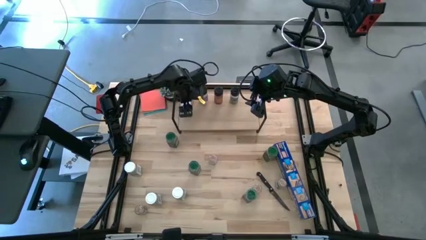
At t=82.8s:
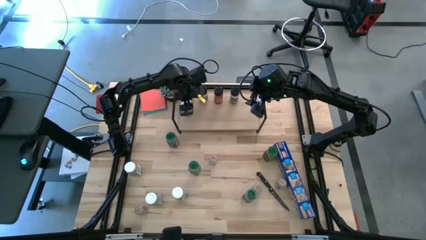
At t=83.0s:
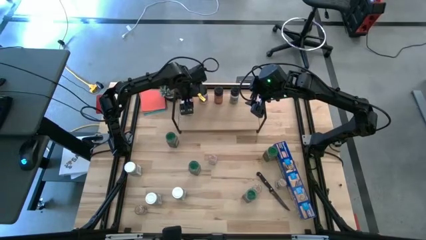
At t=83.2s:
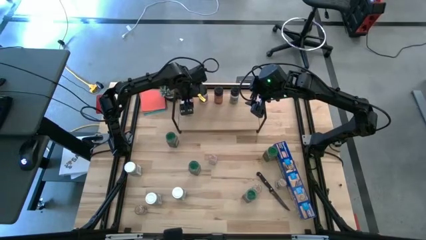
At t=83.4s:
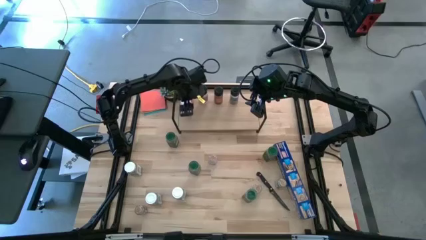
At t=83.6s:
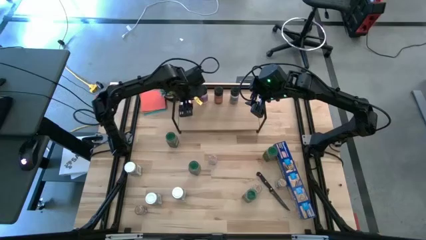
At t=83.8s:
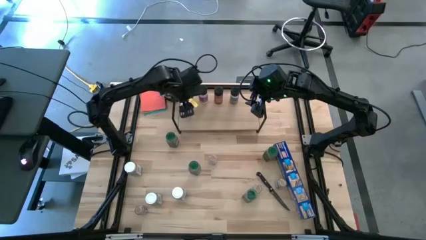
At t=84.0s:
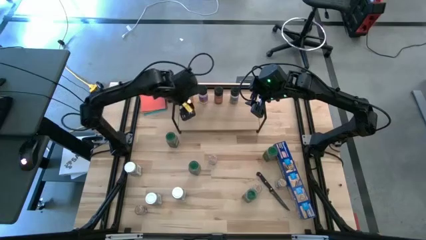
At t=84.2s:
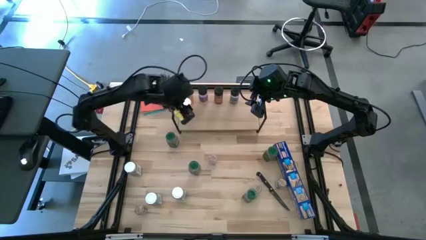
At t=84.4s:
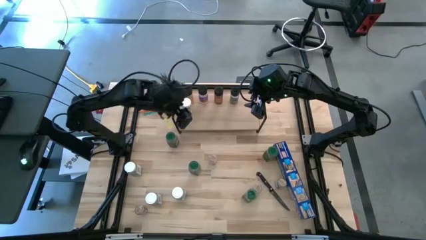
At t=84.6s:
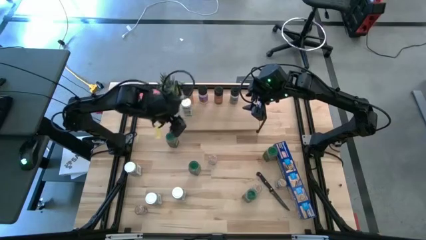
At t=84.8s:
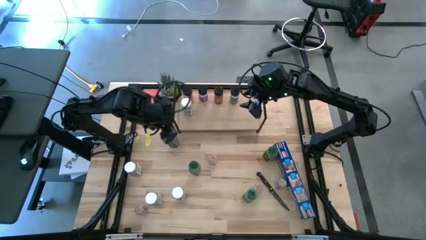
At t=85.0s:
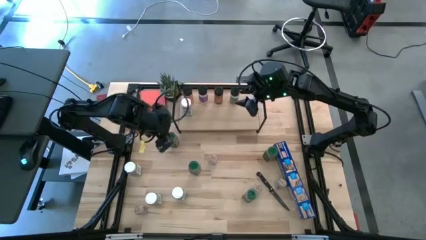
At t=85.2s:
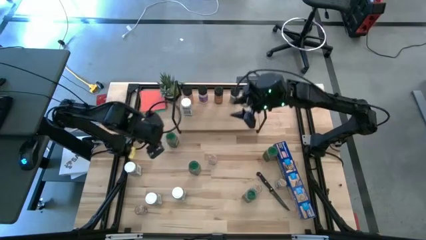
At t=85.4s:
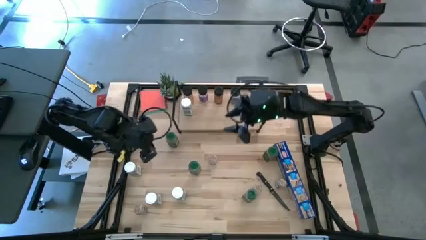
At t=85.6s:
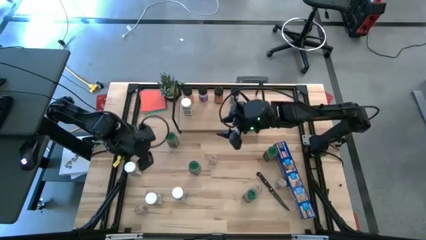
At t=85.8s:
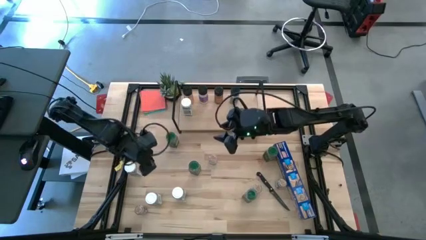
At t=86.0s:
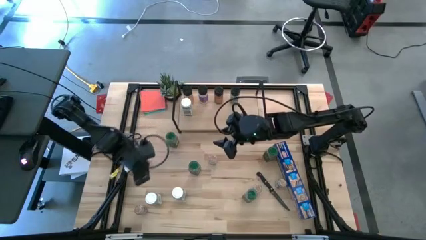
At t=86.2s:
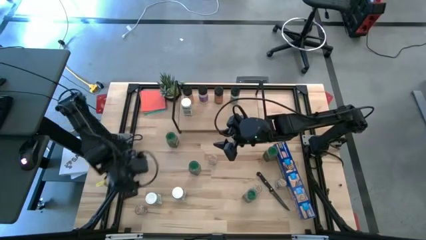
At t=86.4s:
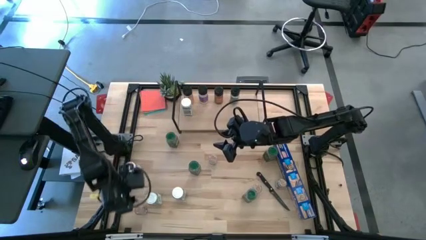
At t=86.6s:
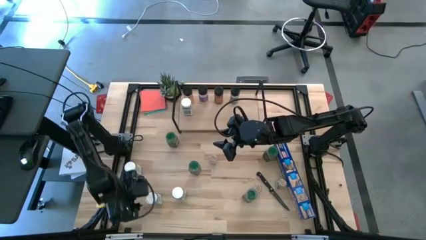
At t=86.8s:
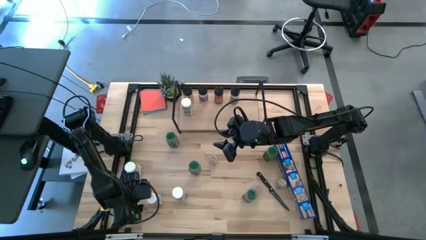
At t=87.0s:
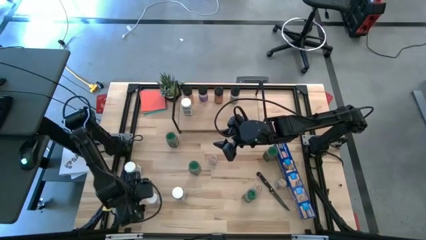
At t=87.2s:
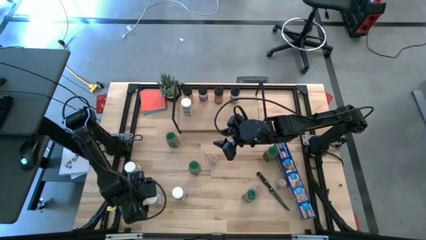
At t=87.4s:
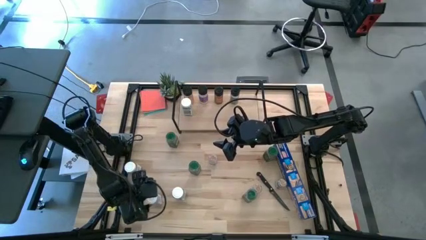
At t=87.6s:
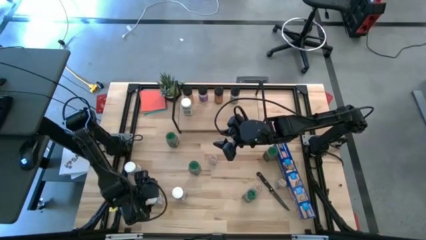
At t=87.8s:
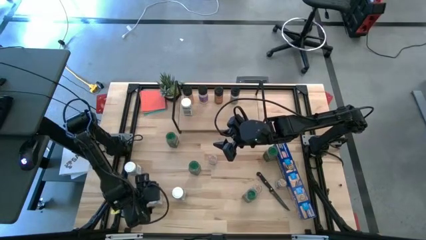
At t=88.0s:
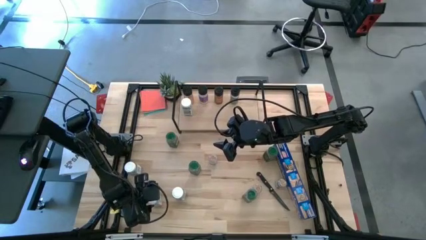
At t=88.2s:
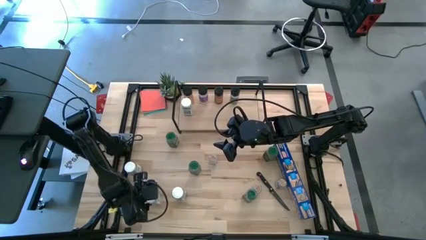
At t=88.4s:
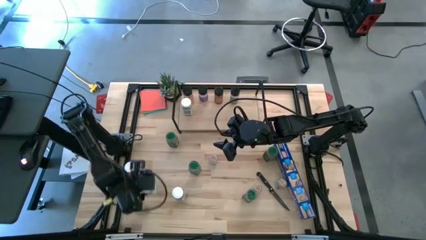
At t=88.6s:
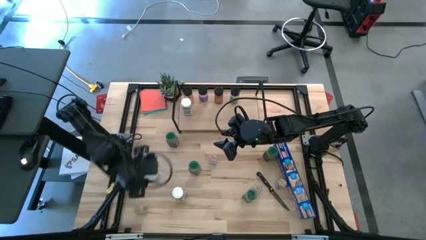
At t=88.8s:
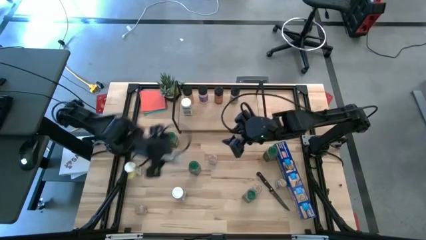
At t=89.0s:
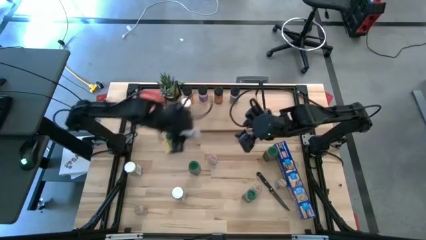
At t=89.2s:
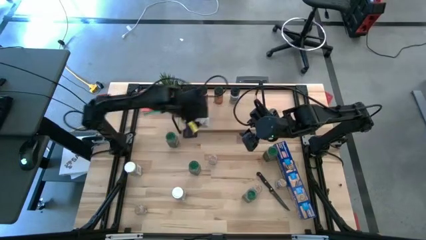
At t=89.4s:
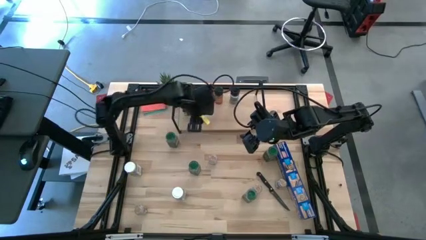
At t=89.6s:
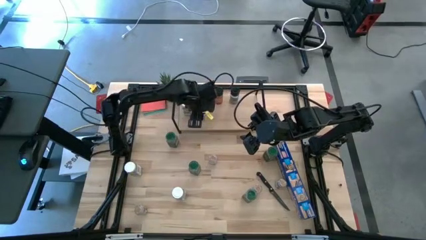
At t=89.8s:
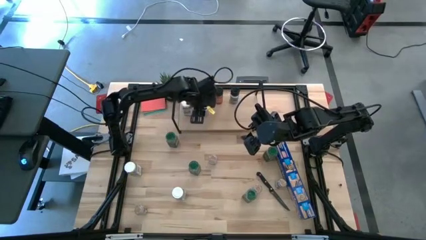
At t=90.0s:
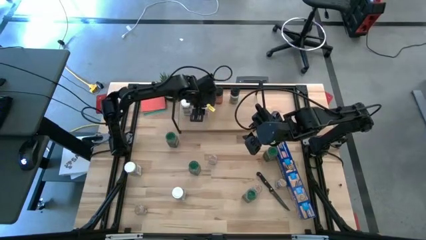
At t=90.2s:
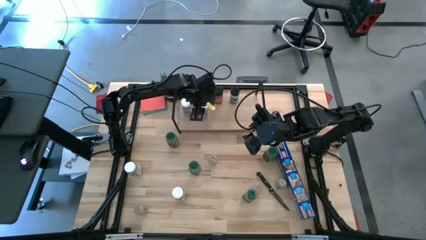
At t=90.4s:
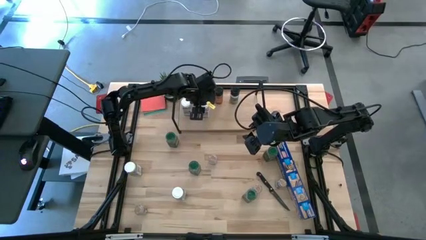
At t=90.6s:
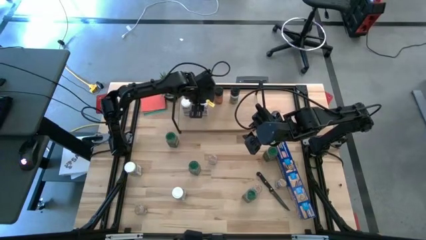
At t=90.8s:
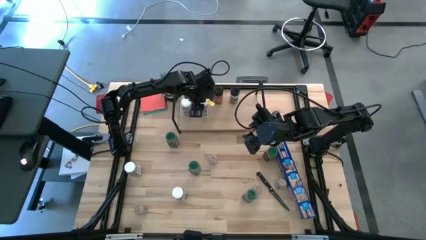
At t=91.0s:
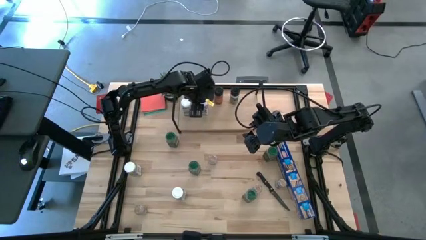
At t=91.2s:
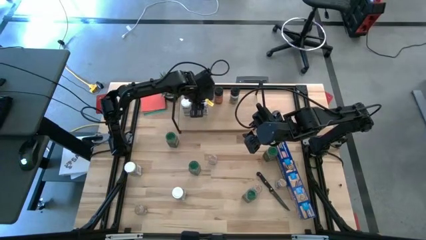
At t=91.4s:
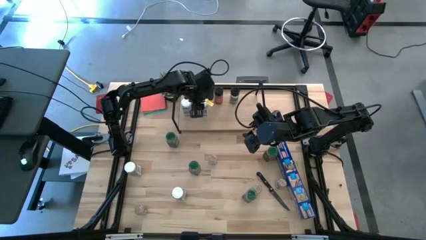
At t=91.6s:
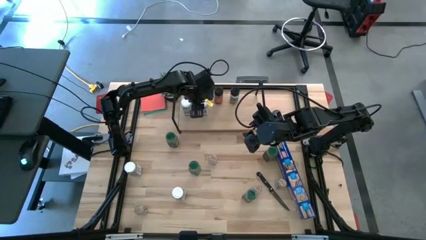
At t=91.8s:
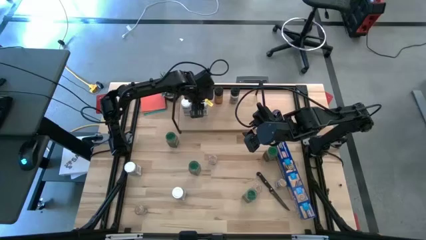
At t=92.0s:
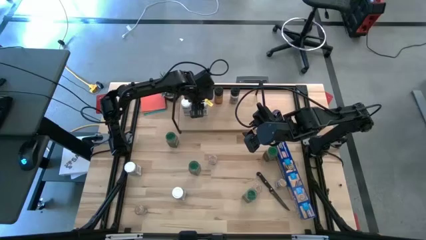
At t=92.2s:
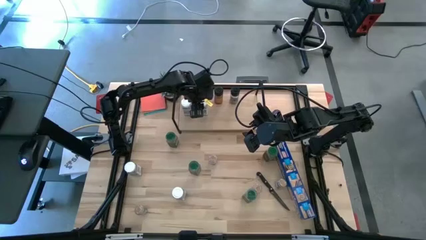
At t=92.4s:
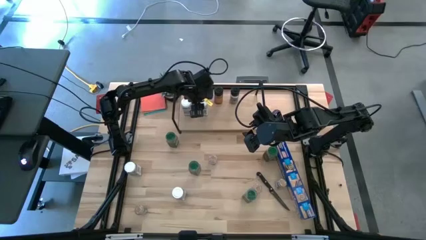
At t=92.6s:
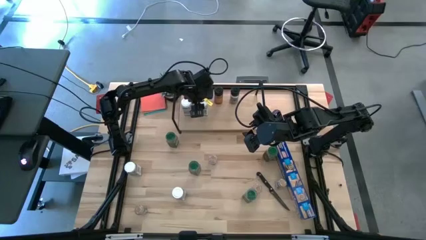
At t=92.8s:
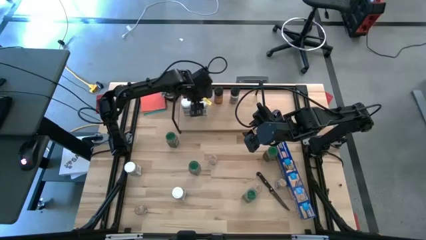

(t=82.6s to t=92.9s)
Task: Shelf spices
Put the white seasoning bottle on the shelf aligned with the black seasoning bottle

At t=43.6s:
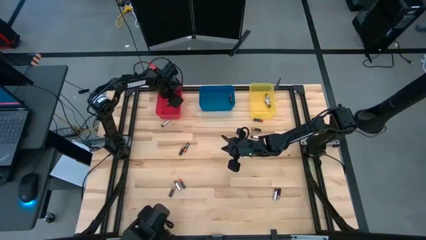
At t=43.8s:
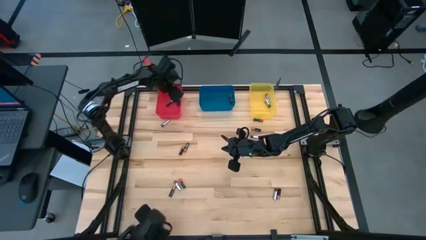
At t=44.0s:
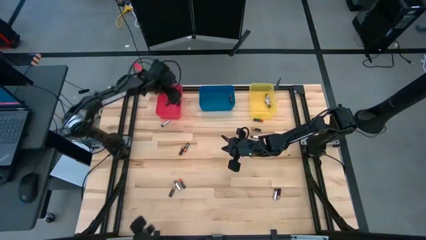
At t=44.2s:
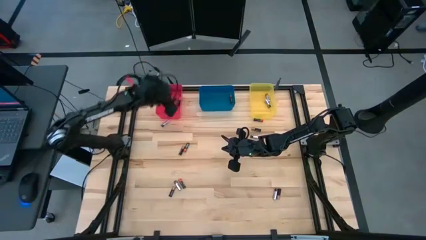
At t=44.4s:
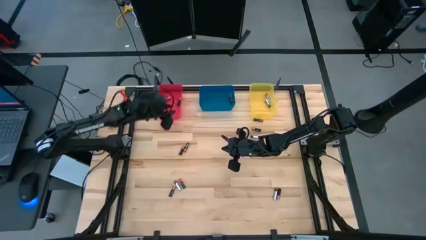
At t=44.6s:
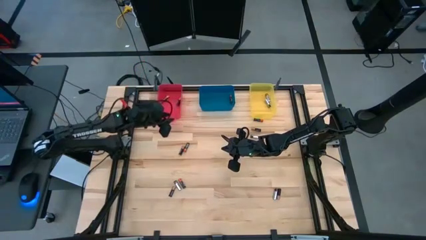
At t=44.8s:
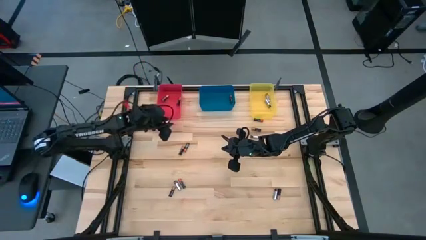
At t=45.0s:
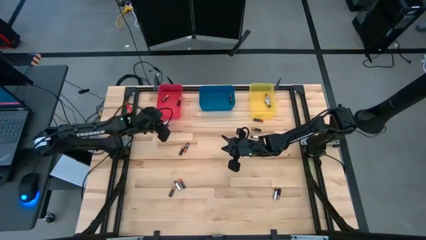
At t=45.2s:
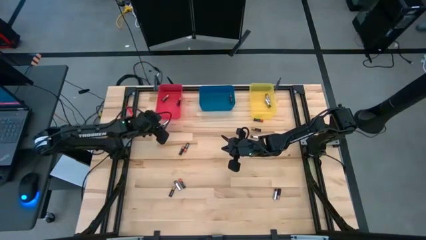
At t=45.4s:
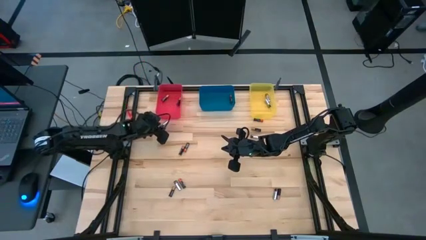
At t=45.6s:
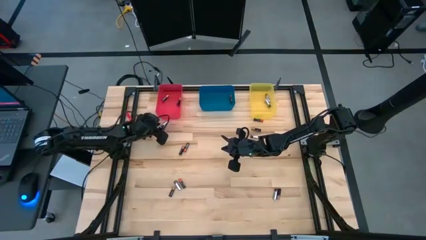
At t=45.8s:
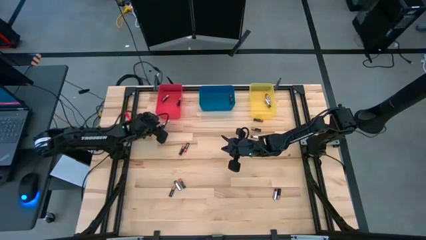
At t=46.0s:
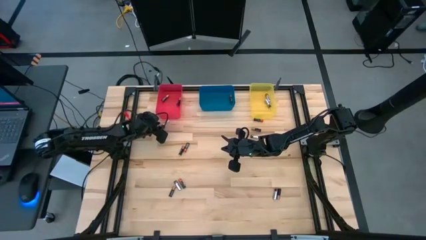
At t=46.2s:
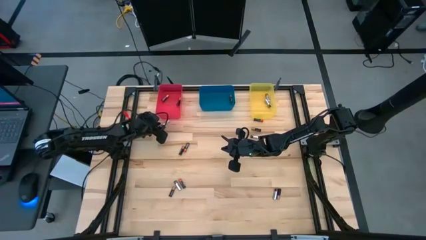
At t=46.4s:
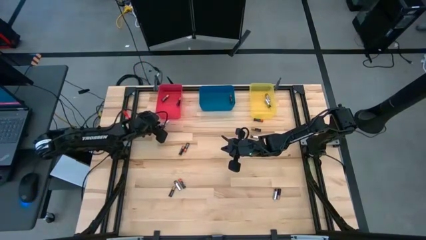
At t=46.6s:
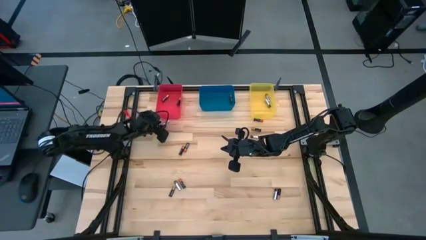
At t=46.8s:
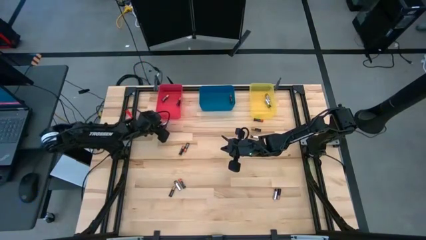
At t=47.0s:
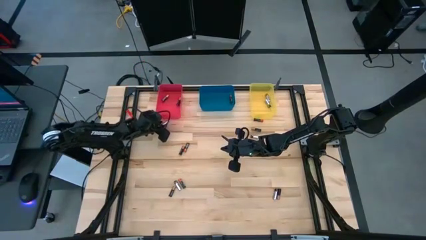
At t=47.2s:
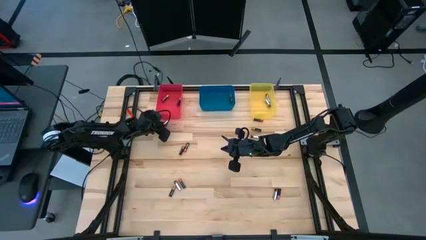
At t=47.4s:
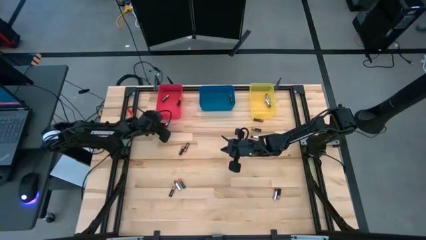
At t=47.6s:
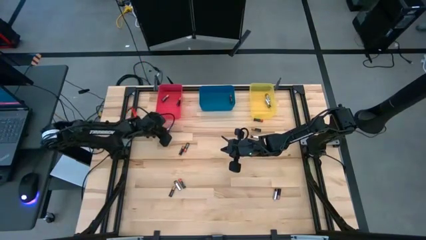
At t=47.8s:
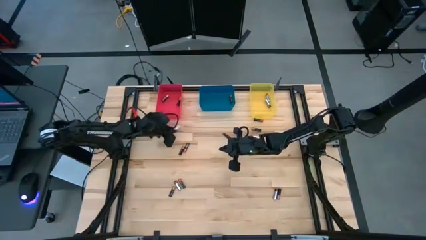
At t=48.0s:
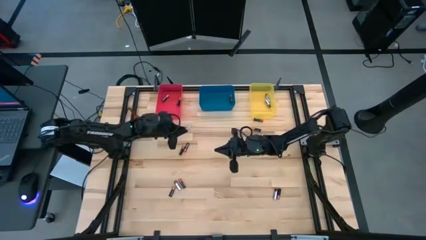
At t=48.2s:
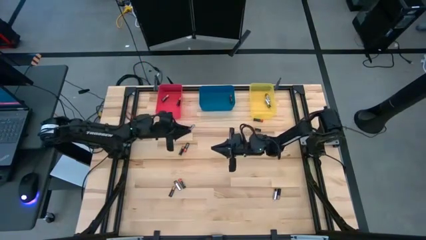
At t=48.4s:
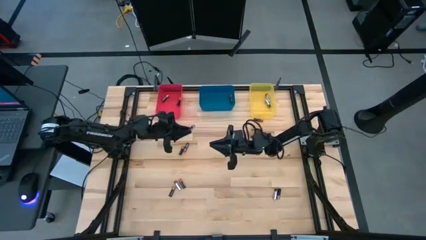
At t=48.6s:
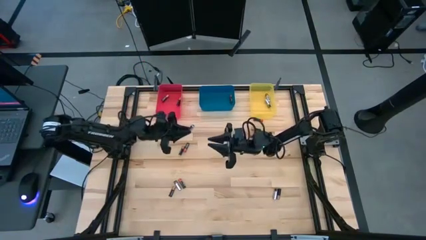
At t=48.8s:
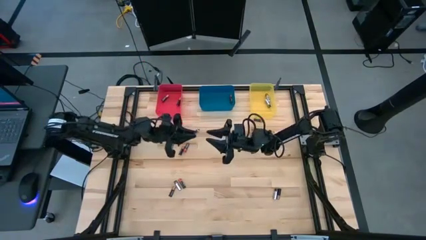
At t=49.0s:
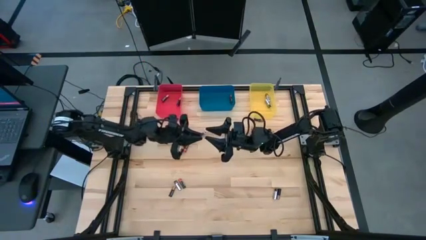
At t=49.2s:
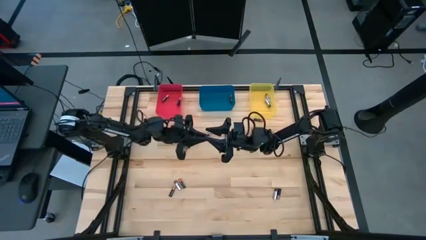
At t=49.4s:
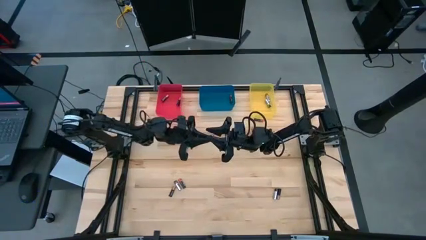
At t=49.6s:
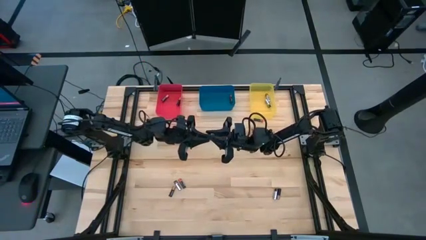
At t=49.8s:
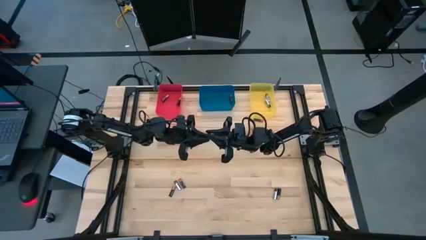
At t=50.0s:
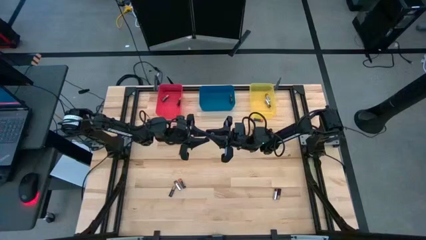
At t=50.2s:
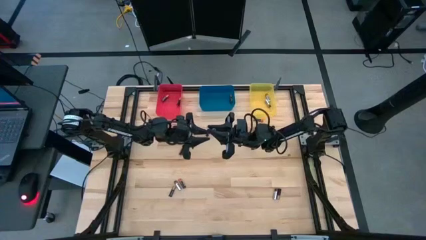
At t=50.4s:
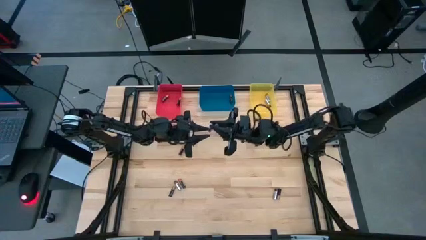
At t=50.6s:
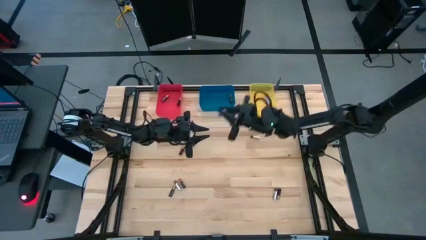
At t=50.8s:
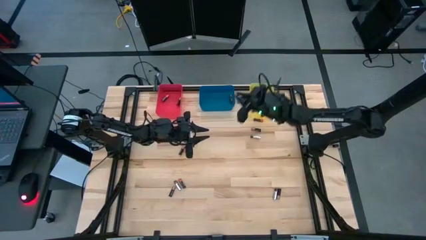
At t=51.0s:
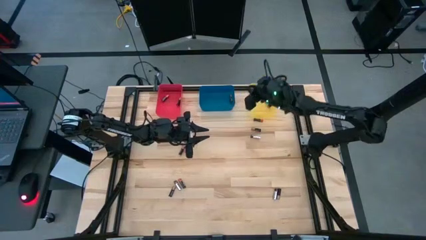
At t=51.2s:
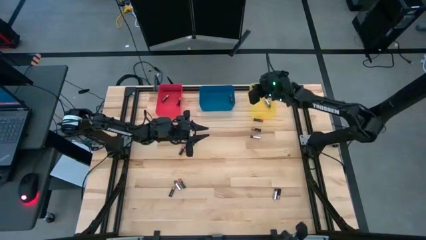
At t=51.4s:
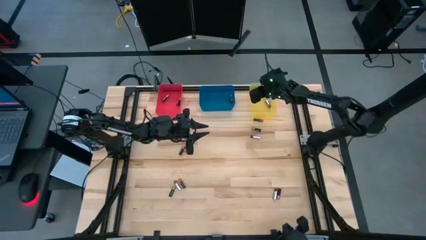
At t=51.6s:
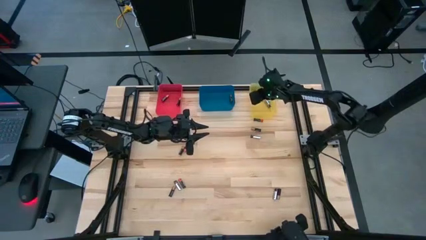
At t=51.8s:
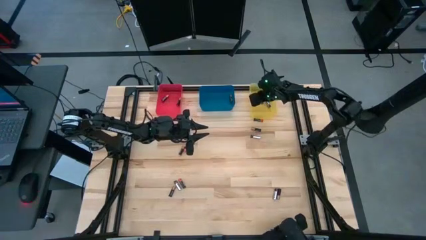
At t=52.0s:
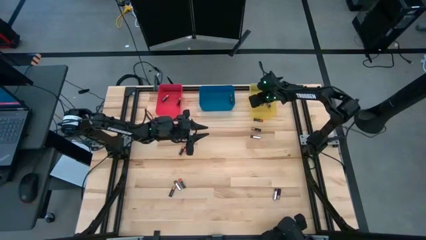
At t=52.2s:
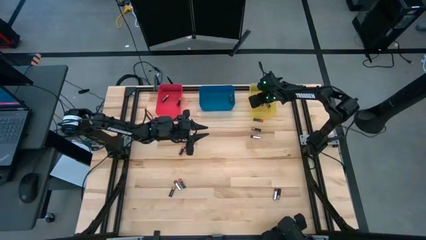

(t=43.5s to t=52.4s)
Task: Sort batteries
Put the silver battery into the yellow bin
